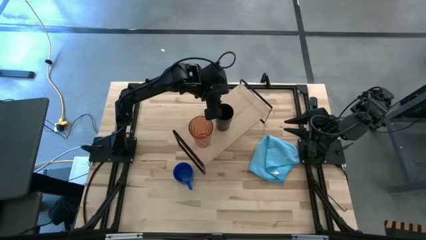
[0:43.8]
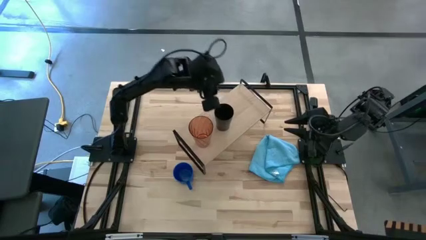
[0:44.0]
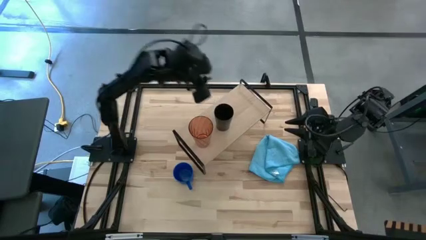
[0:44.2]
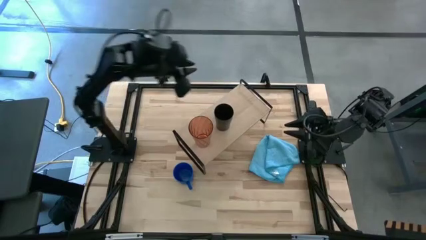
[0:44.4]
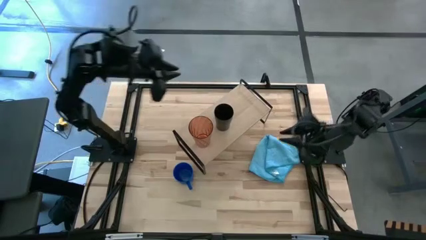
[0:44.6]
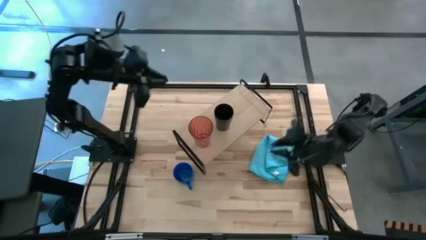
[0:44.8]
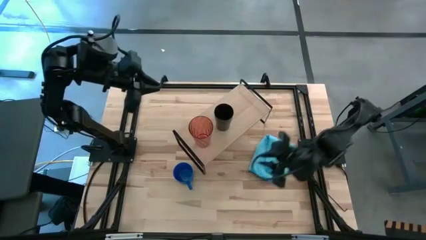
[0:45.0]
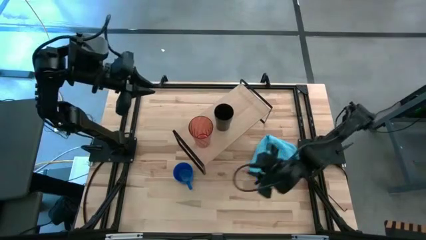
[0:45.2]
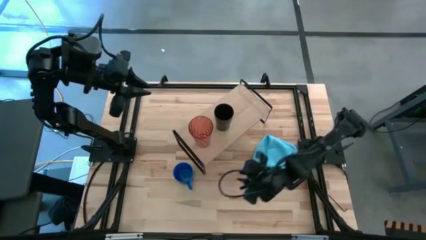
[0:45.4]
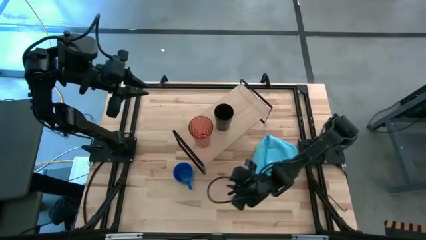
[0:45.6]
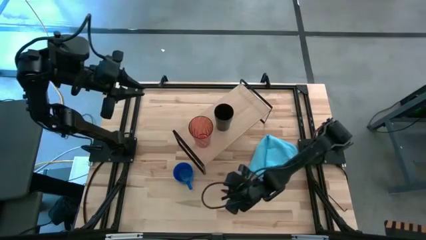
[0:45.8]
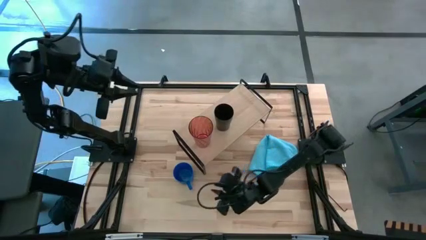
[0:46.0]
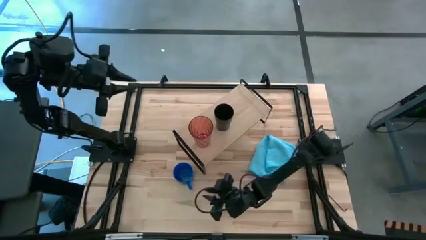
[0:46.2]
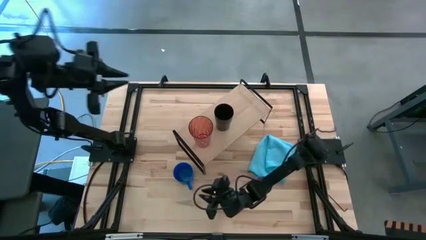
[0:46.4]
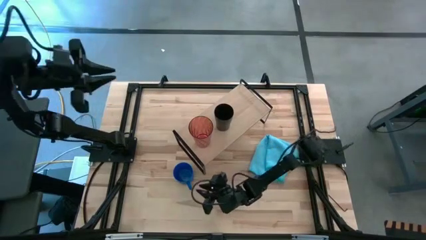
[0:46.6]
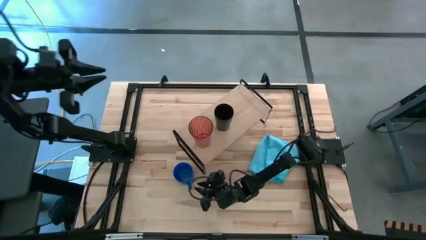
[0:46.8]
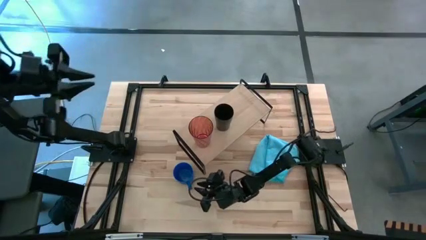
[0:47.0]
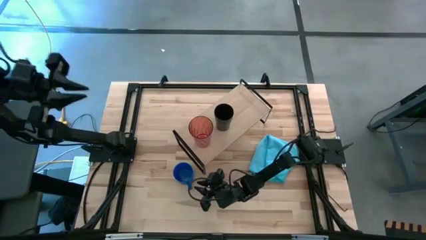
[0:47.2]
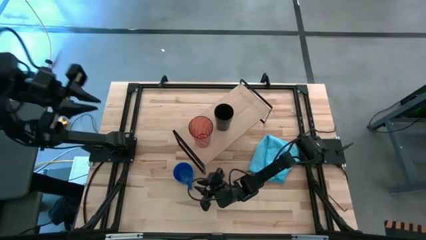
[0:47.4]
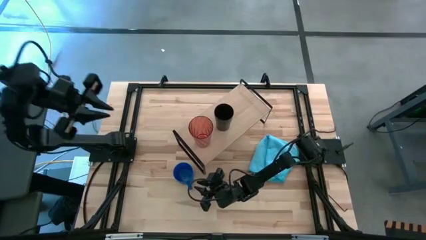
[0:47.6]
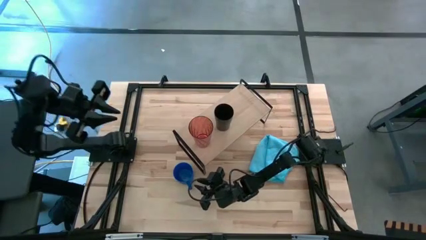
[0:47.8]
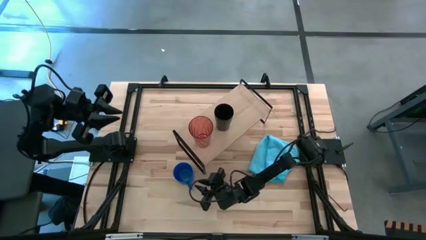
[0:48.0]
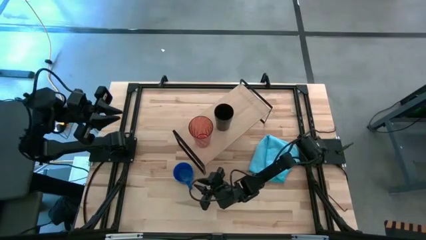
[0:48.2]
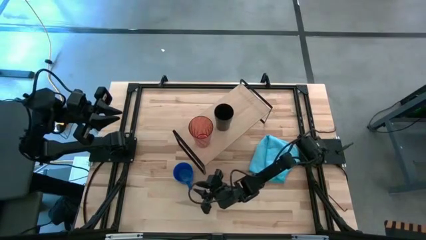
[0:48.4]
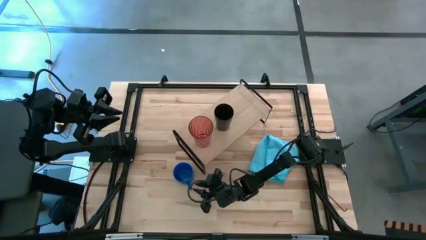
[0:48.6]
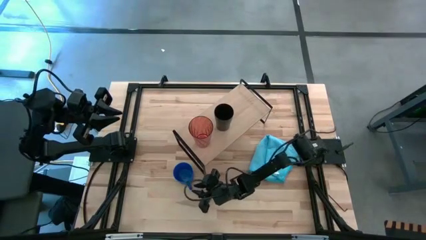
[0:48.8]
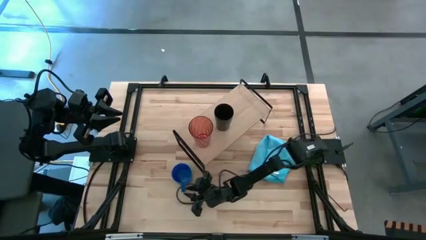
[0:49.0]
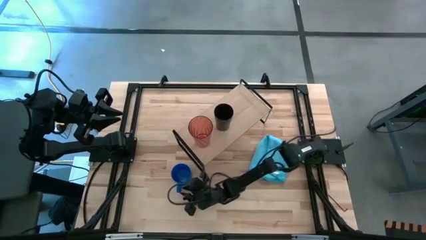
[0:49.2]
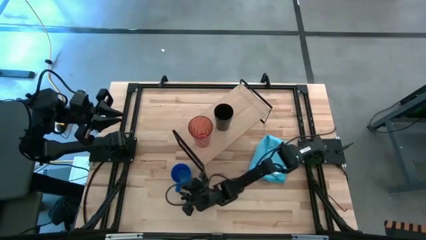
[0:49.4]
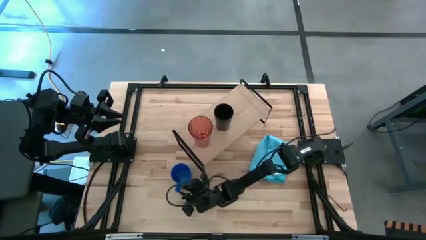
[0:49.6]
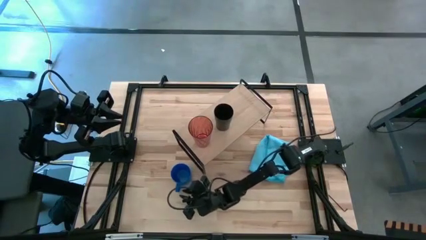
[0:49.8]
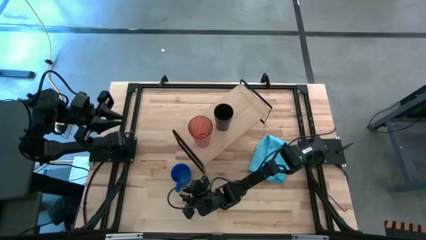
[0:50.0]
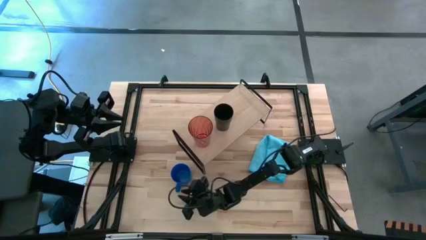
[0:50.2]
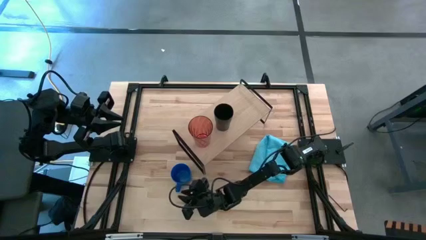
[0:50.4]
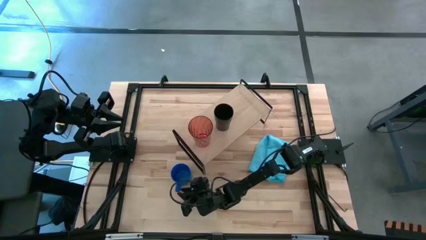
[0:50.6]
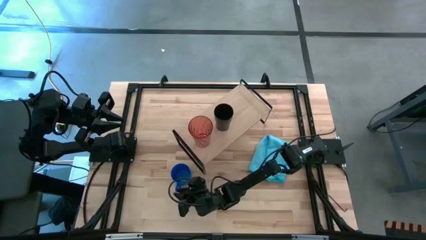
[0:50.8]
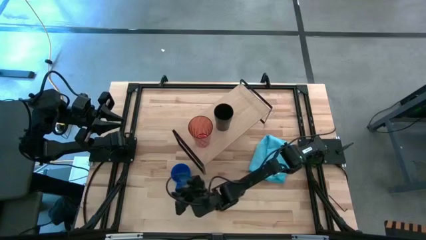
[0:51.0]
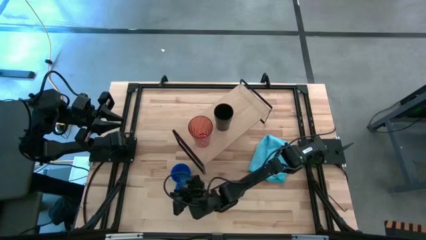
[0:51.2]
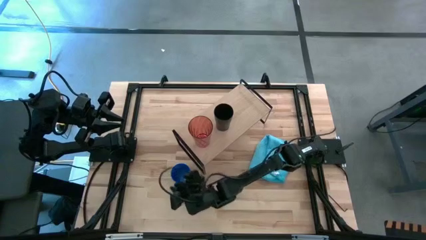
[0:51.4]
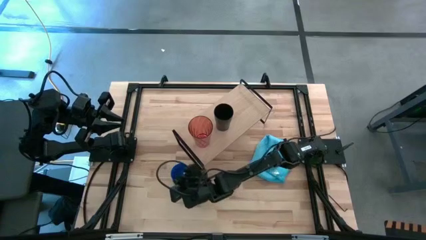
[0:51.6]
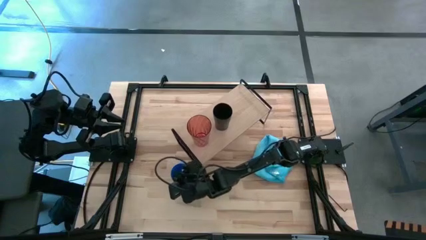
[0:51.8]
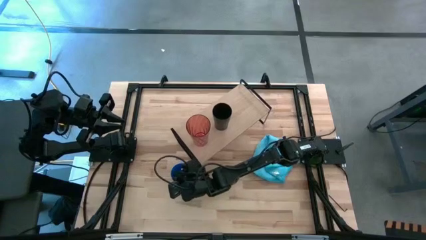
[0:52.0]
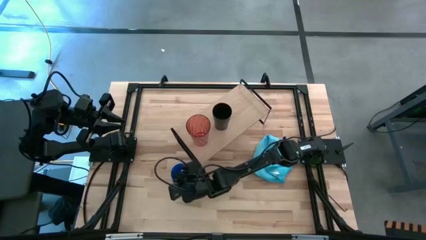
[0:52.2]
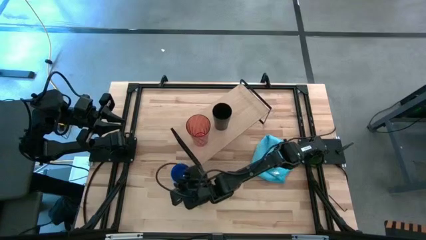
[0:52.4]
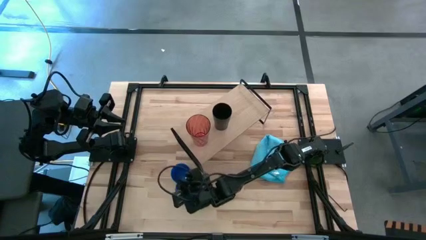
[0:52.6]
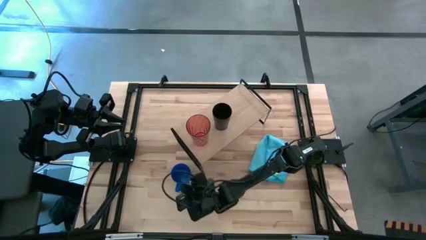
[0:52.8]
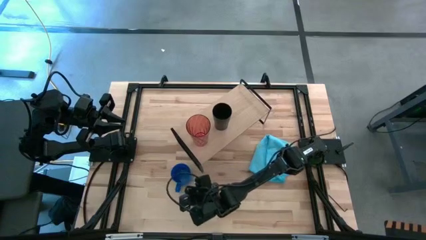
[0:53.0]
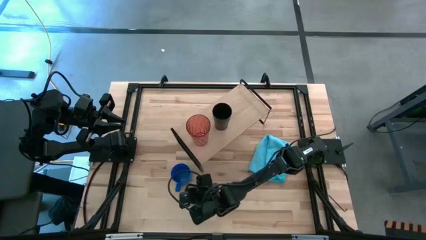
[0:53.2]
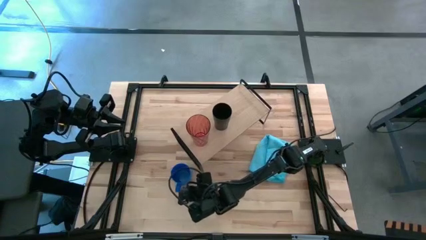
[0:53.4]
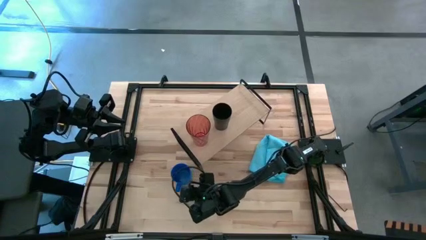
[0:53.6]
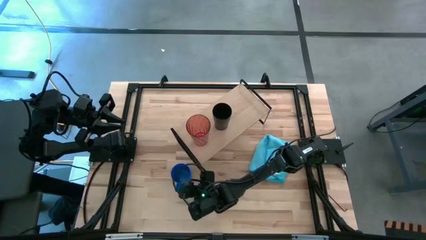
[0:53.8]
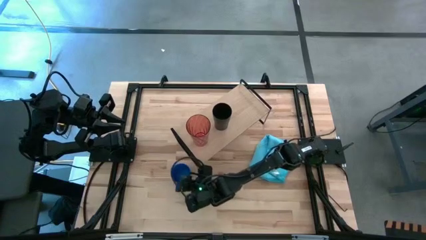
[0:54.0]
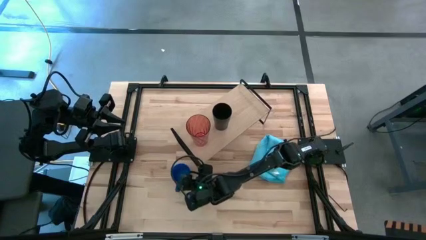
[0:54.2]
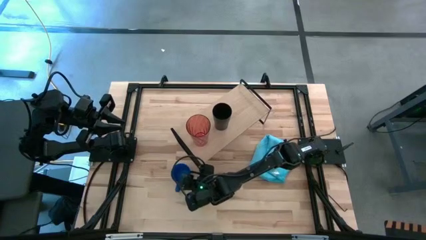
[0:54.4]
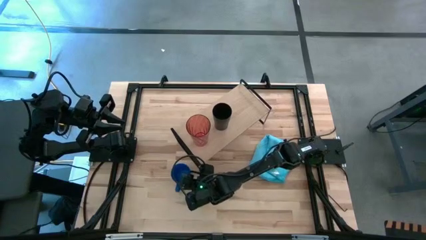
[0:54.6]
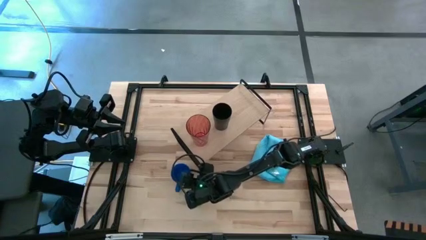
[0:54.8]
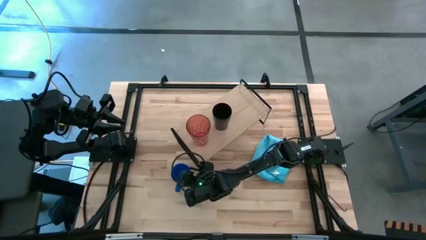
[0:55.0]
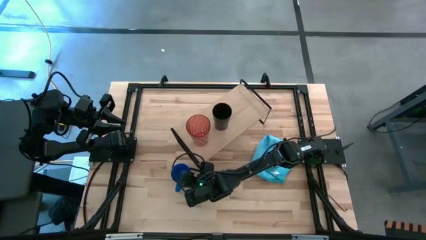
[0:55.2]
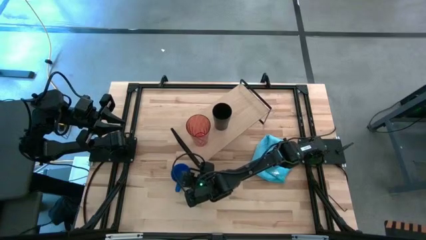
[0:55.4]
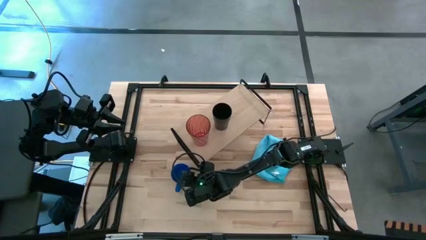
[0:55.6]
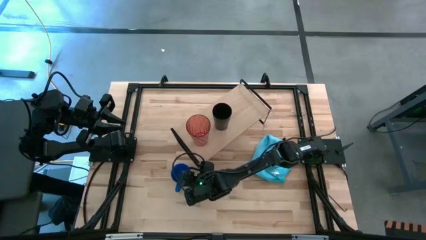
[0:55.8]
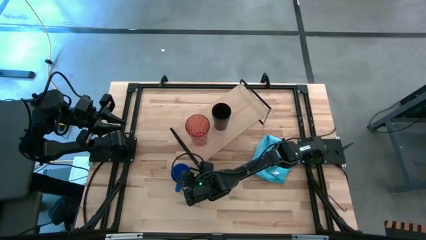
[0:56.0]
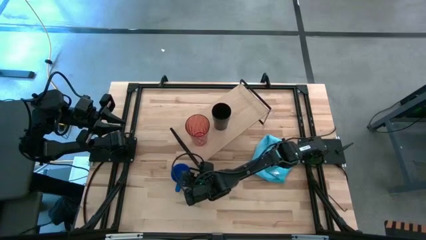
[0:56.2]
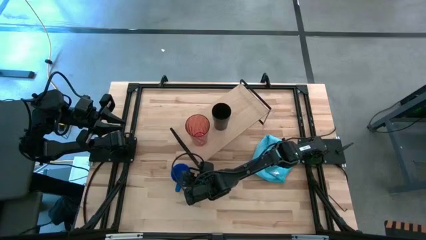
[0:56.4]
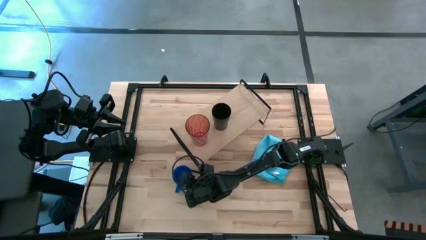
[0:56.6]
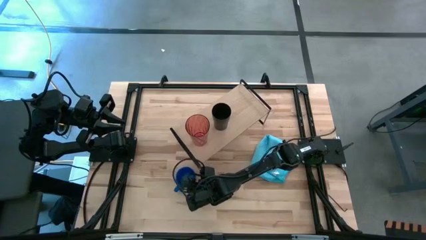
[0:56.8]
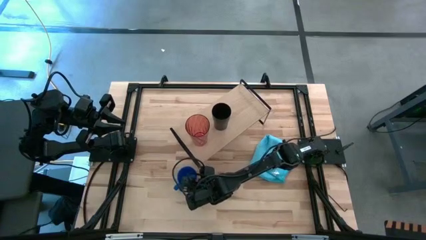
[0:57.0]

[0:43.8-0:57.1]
Task: Stack small to large cups/mugs on shelf
Put the blue mug on the shelf
